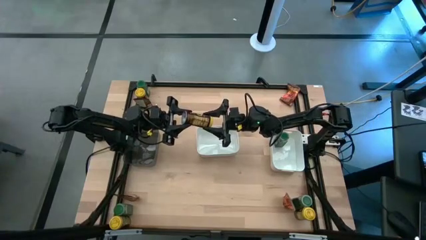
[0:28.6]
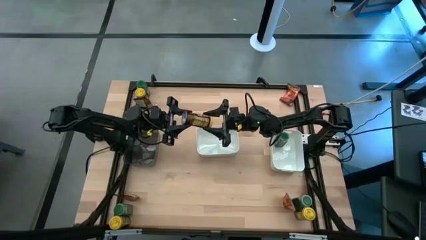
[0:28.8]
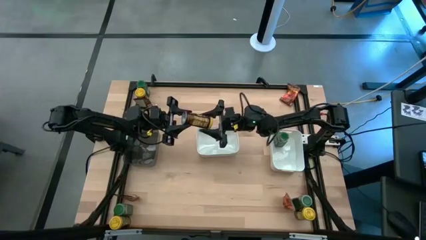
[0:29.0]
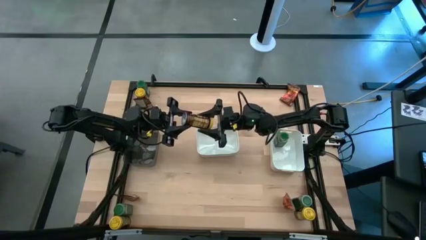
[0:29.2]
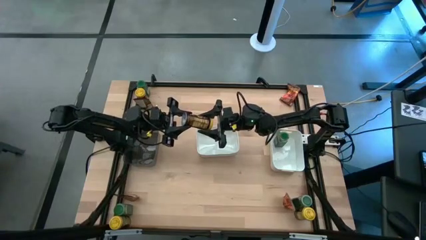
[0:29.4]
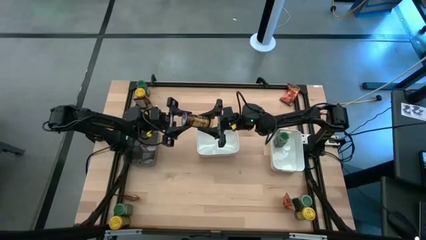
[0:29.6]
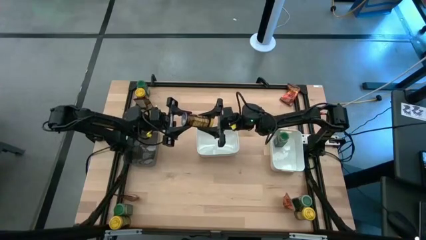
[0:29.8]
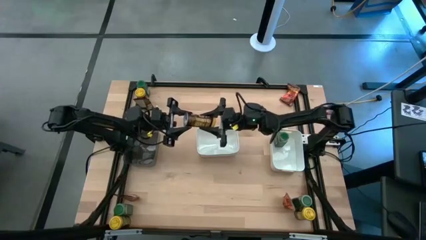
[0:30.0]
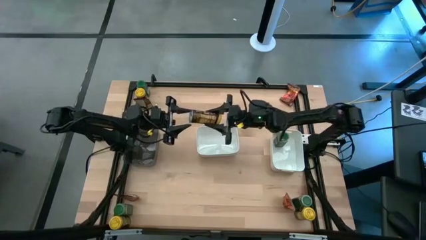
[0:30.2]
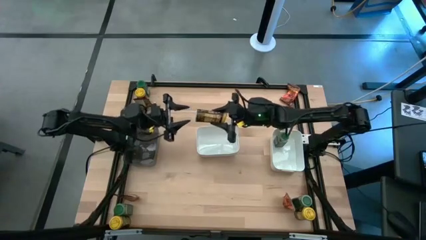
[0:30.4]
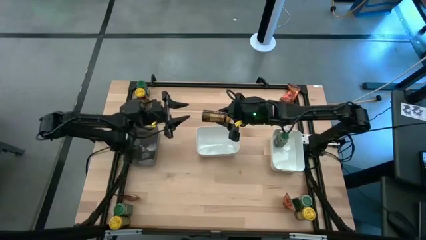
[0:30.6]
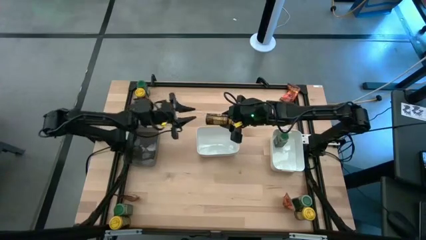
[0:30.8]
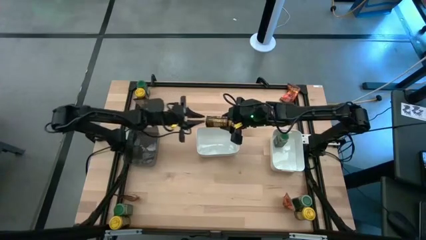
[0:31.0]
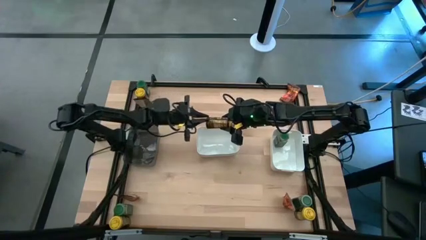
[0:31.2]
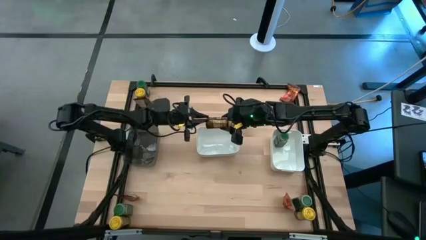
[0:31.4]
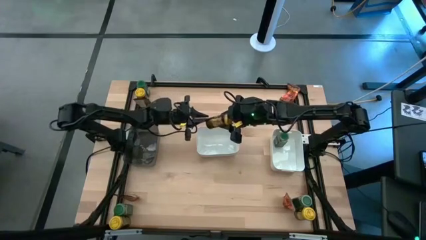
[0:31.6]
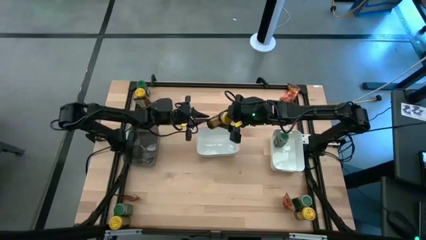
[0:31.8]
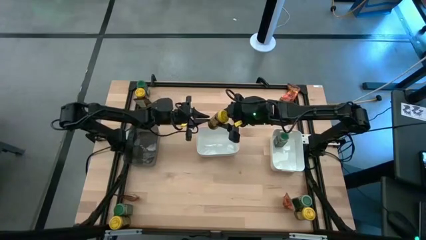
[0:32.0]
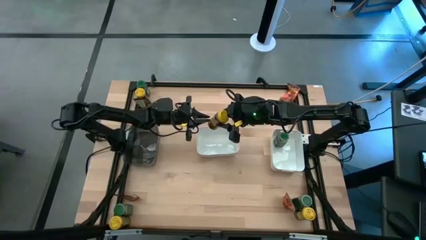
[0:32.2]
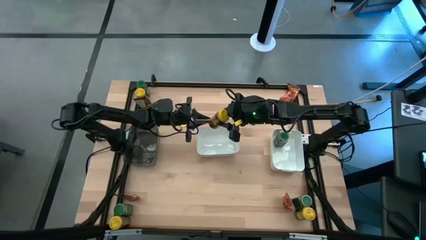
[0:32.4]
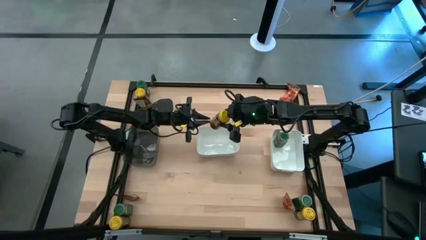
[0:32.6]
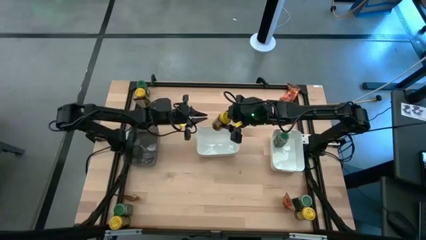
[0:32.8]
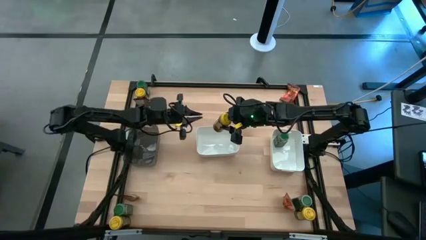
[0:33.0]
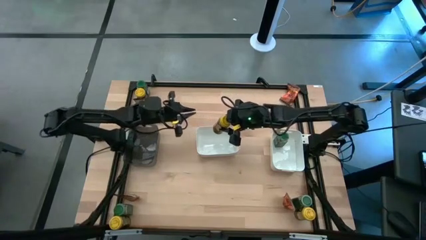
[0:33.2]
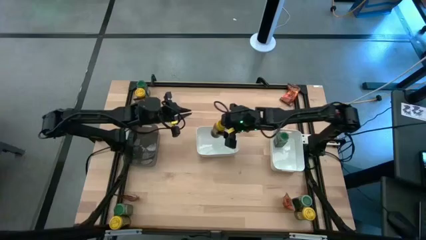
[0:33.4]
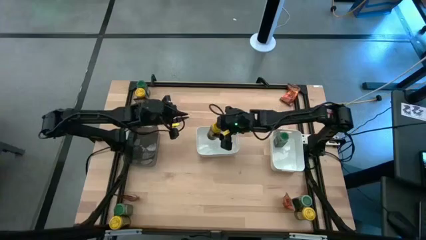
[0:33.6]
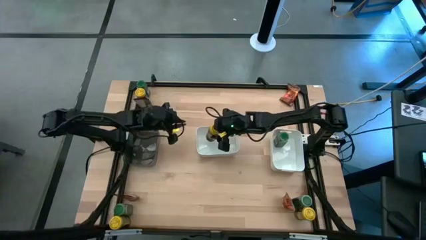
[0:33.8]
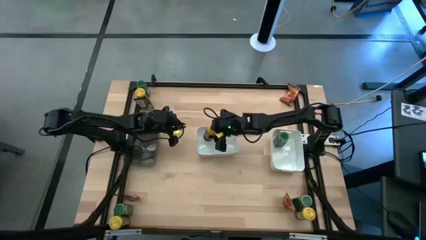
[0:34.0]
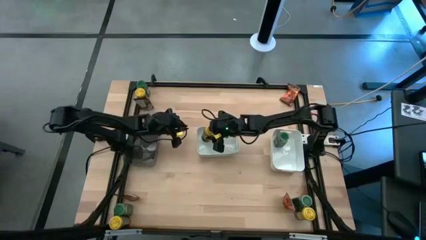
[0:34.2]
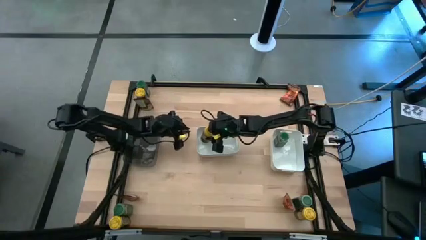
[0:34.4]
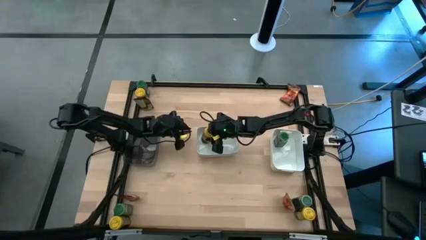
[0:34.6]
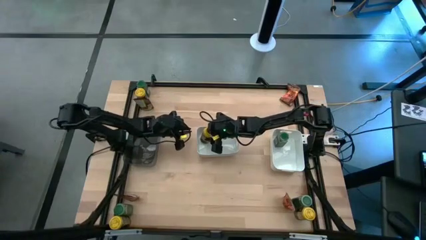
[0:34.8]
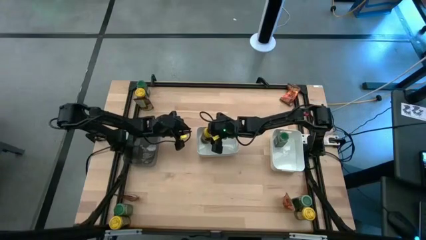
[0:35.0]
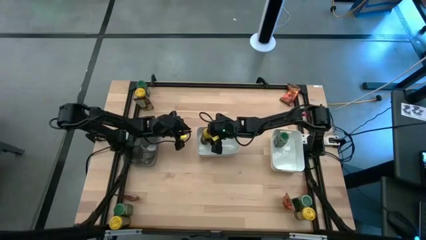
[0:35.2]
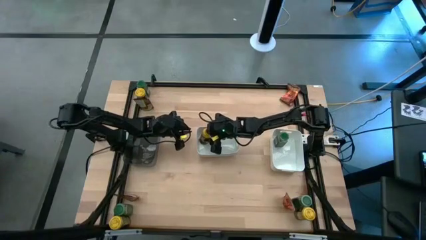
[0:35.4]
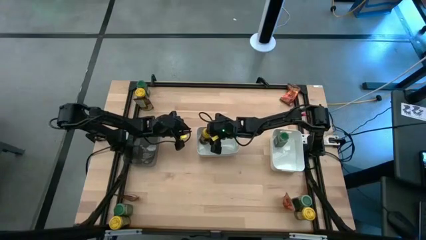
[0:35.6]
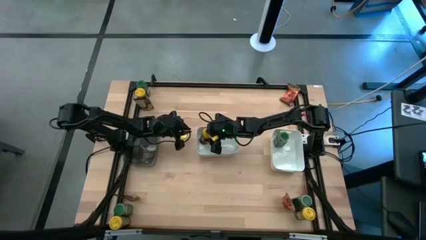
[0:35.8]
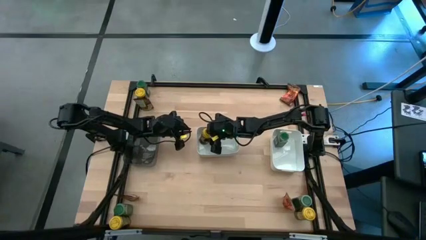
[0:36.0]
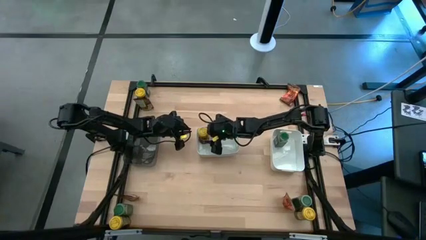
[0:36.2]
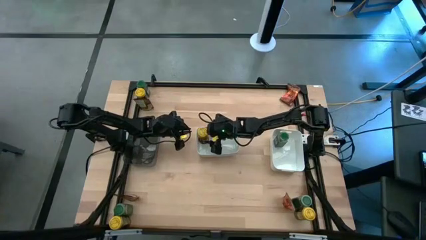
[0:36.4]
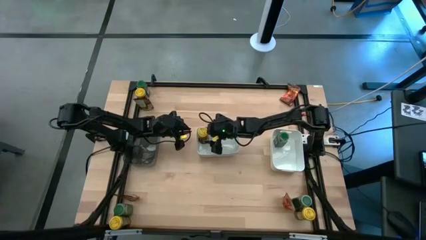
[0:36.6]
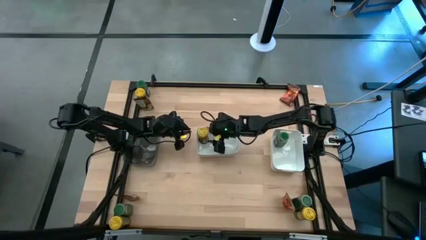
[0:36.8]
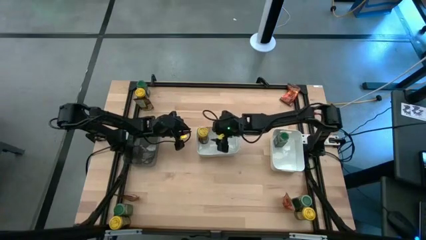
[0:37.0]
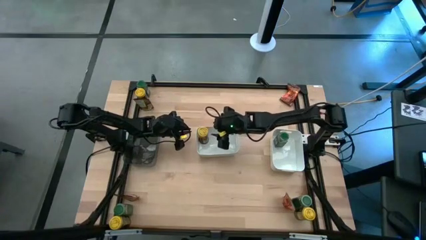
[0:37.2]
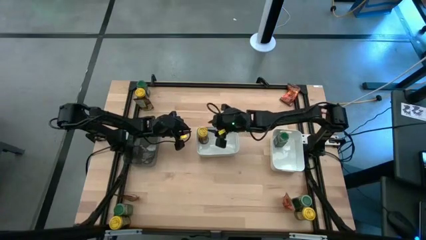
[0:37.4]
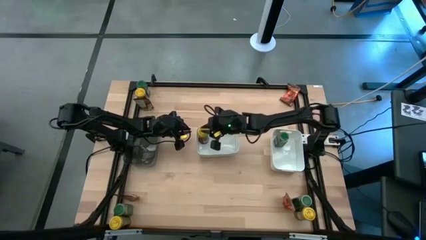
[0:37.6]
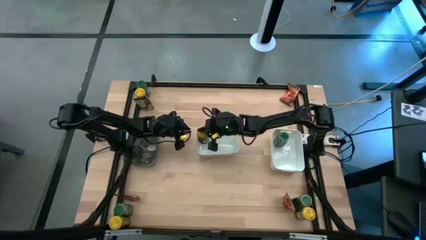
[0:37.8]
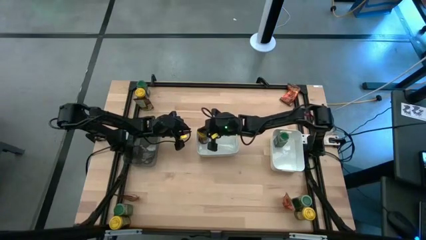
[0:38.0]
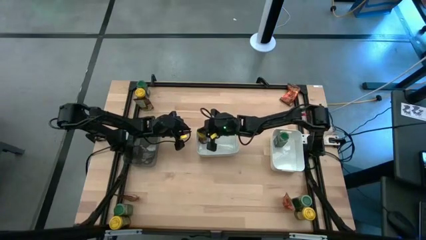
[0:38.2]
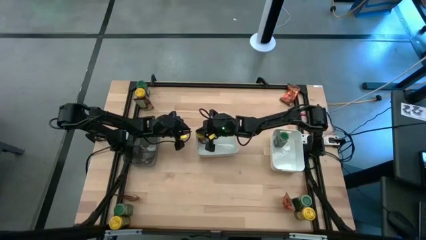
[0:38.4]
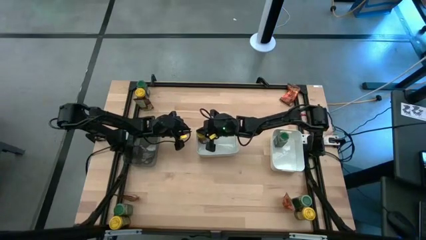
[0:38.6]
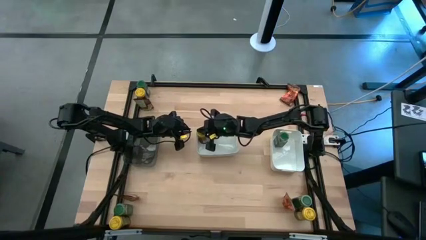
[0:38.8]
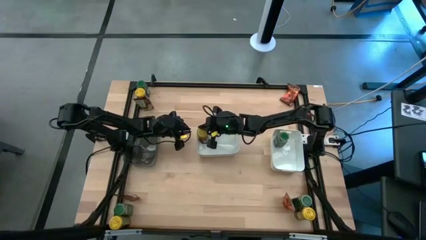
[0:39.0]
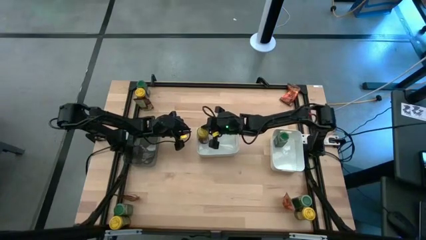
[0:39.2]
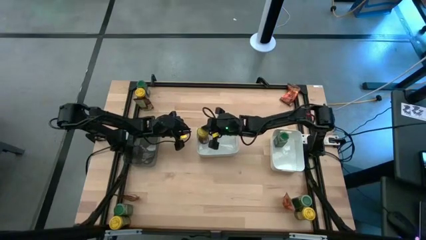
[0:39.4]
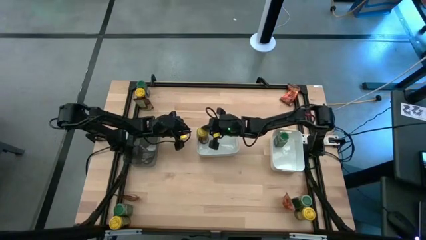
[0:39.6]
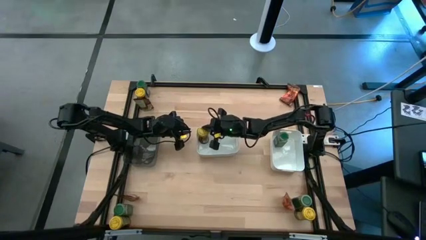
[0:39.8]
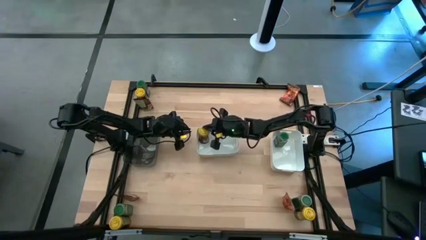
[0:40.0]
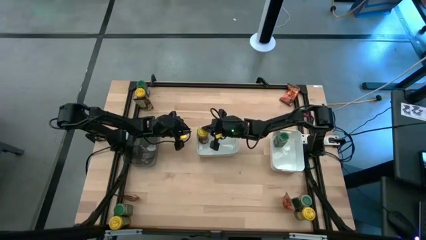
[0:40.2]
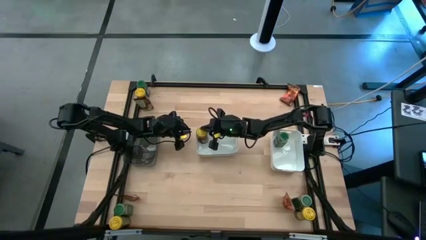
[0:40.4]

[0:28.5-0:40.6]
Task: Sort spices by type
Put the top right yellow seasoning bottle into the left white bin

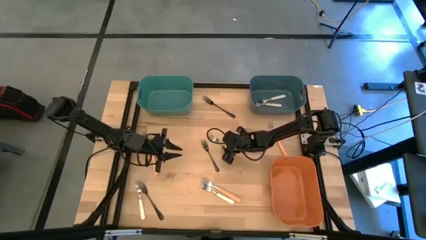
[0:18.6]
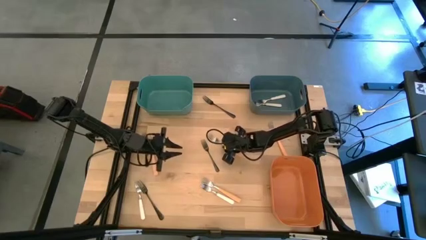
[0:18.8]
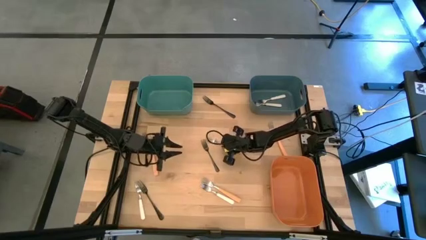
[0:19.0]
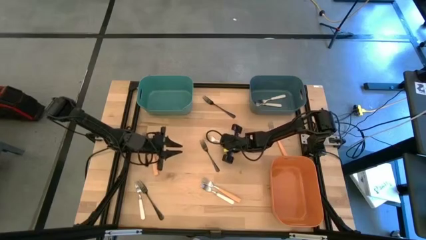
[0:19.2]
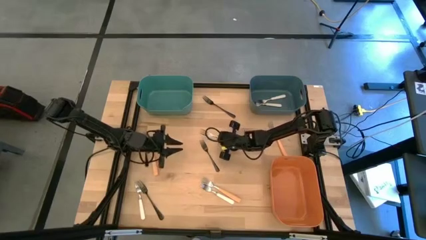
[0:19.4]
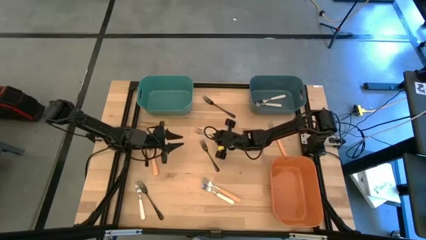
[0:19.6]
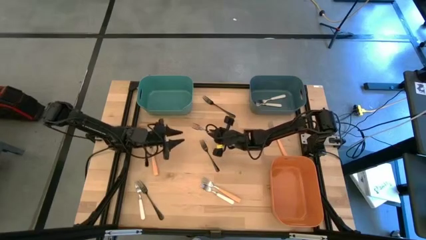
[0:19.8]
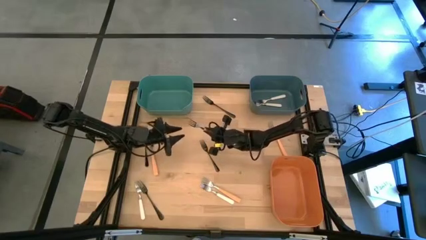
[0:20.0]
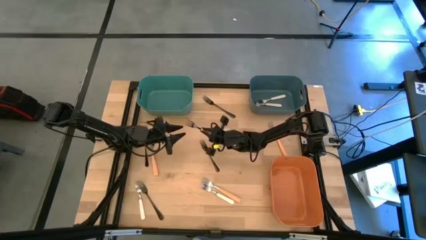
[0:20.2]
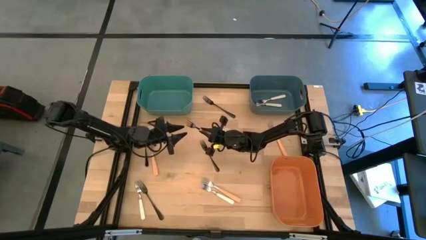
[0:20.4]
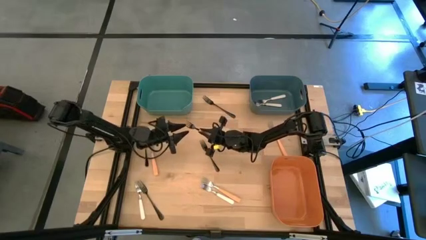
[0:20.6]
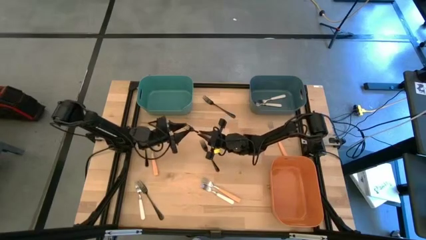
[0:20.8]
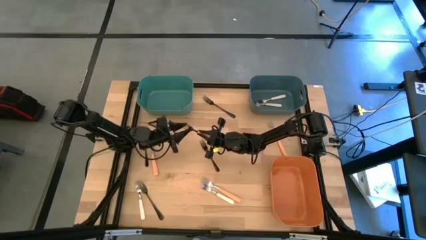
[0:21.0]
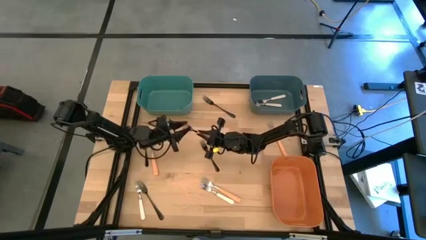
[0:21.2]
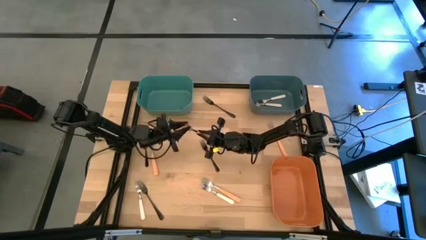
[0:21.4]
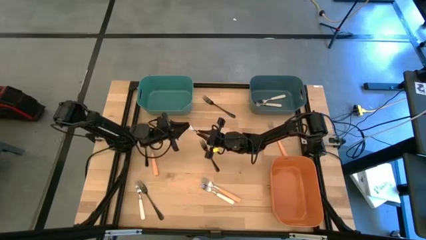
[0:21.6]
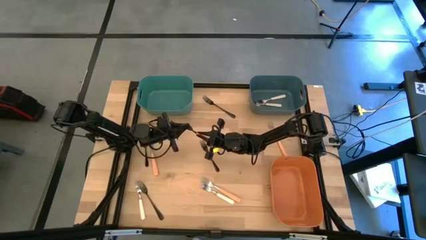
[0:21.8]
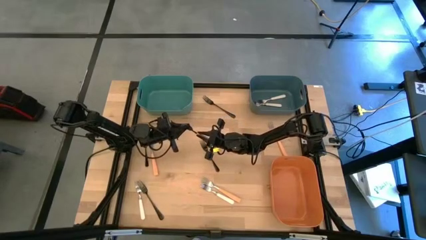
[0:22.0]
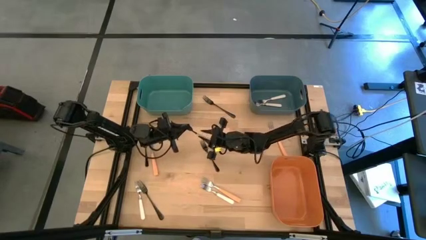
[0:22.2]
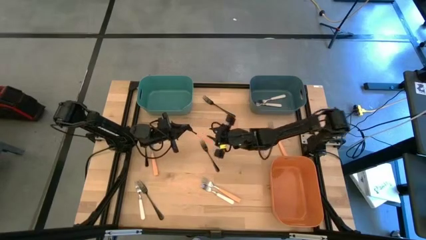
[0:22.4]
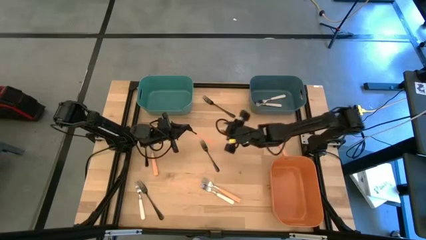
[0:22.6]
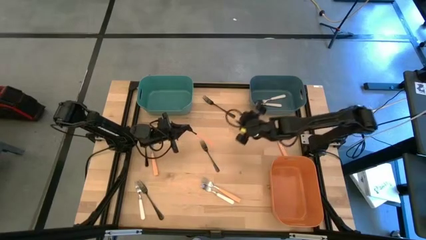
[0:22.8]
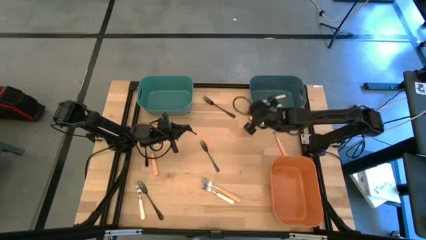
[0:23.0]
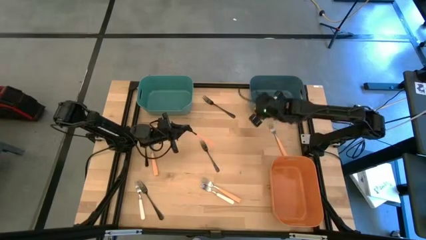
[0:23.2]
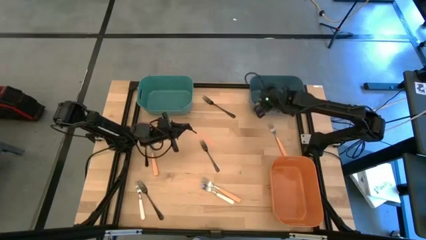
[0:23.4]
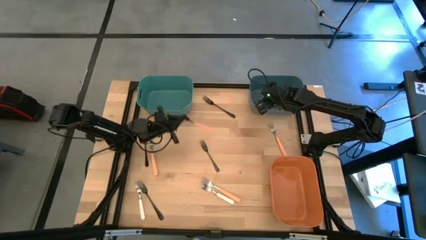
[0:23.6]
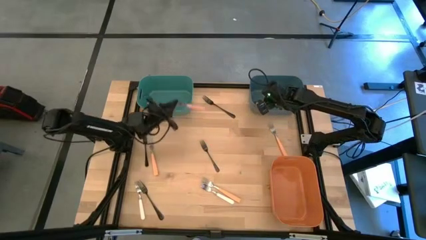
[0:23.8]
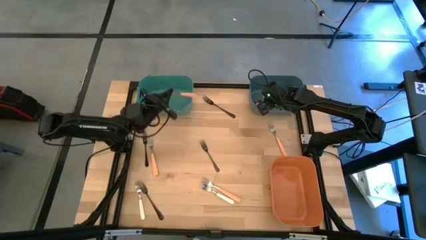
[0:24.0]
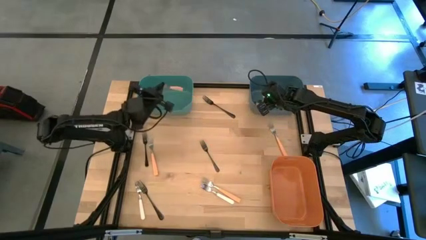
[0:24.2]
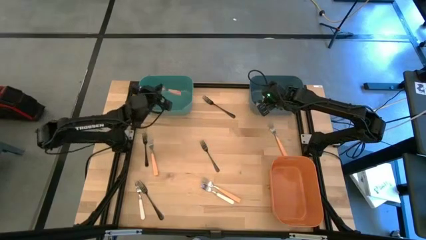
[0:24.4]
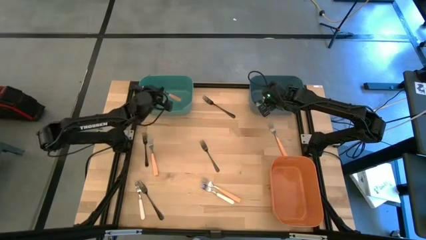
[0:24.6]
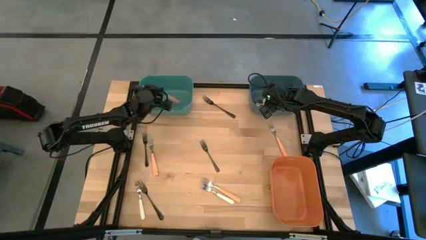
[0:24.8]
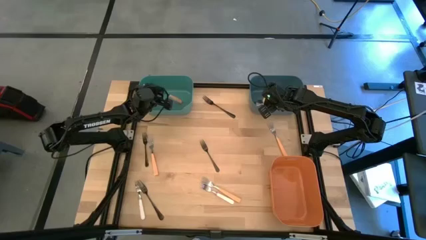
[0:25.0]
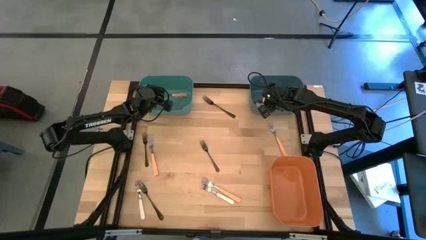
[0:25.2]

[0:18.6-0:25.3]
Task: Sort silverware by color (type)
Put the browm fork into the green bin
